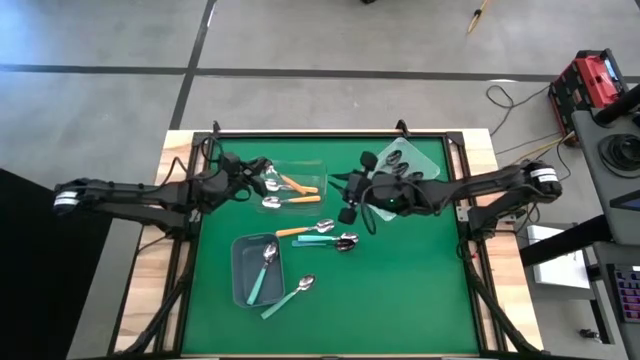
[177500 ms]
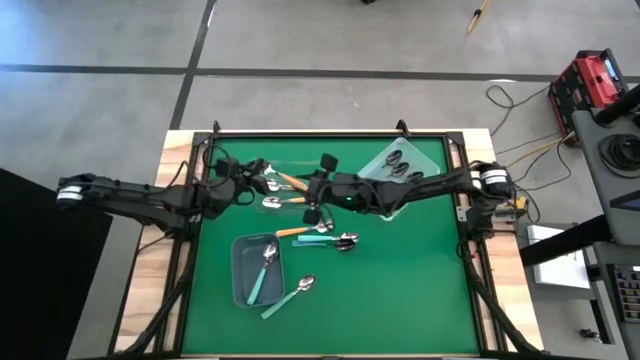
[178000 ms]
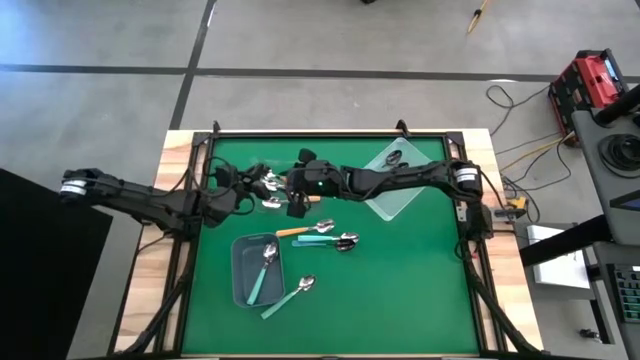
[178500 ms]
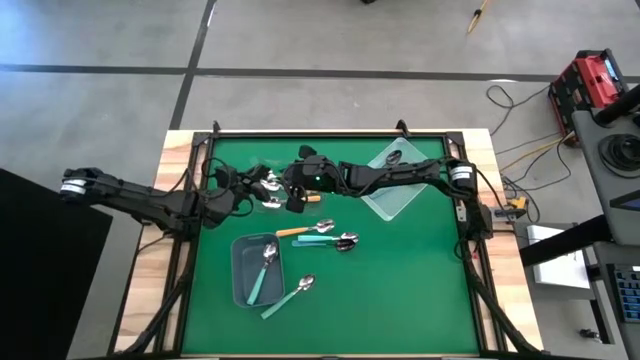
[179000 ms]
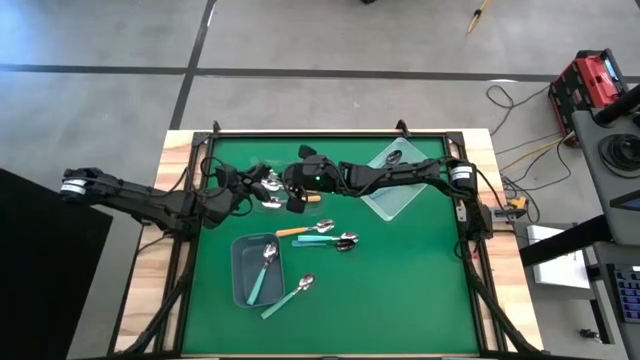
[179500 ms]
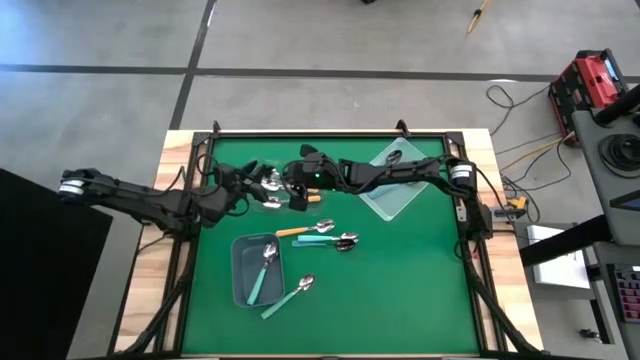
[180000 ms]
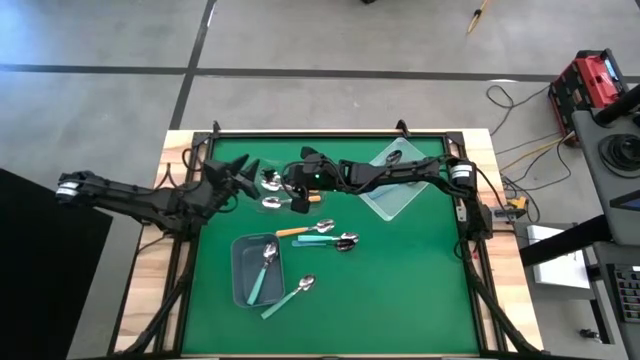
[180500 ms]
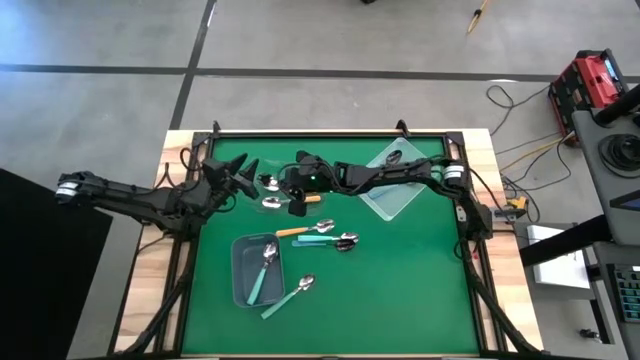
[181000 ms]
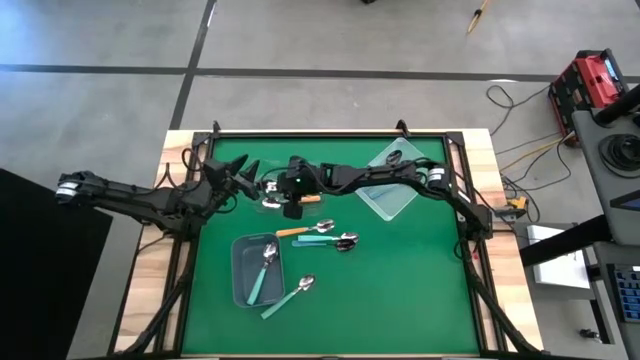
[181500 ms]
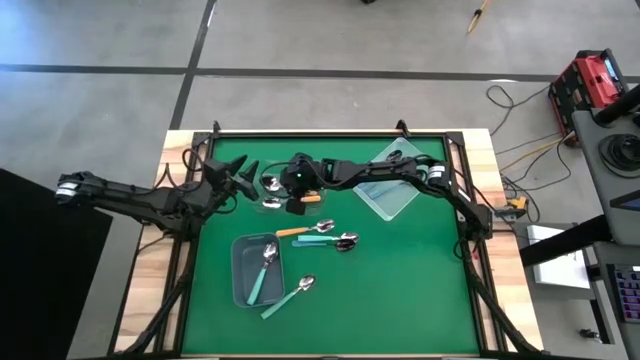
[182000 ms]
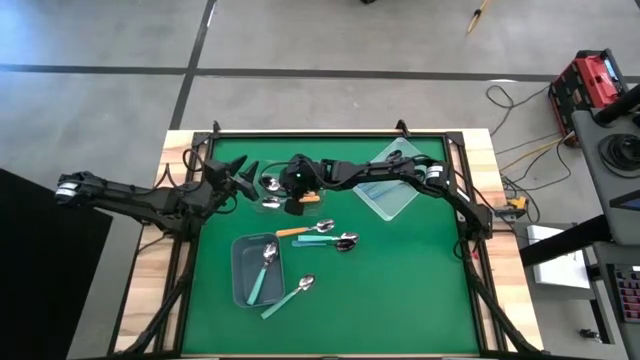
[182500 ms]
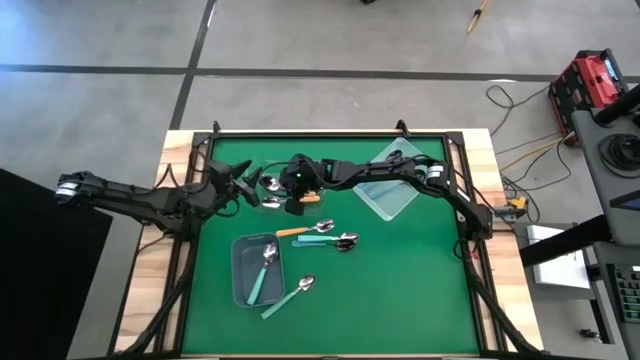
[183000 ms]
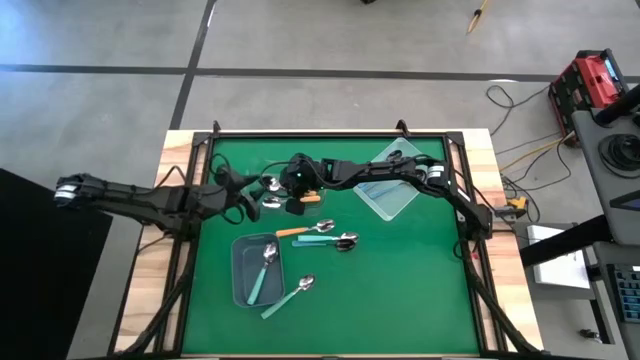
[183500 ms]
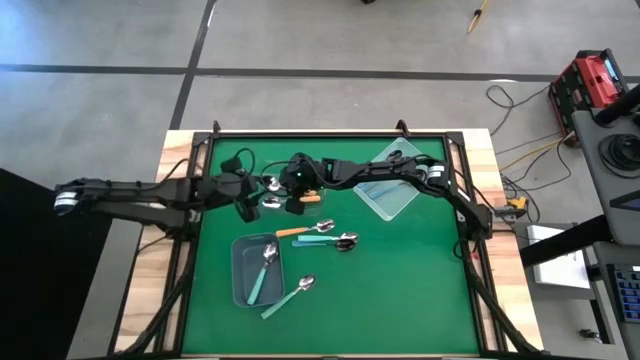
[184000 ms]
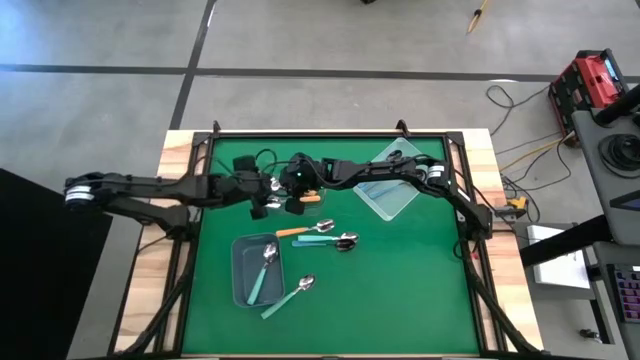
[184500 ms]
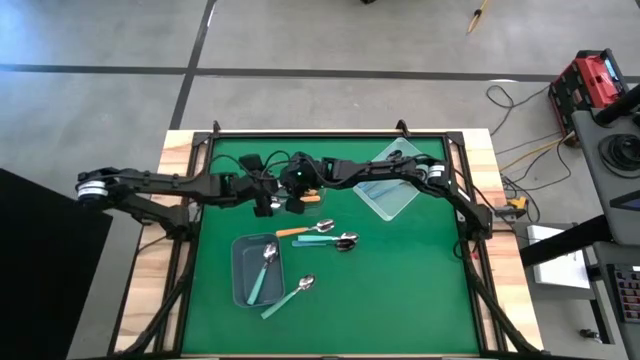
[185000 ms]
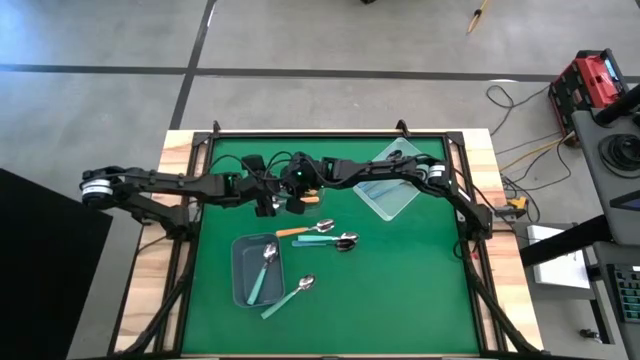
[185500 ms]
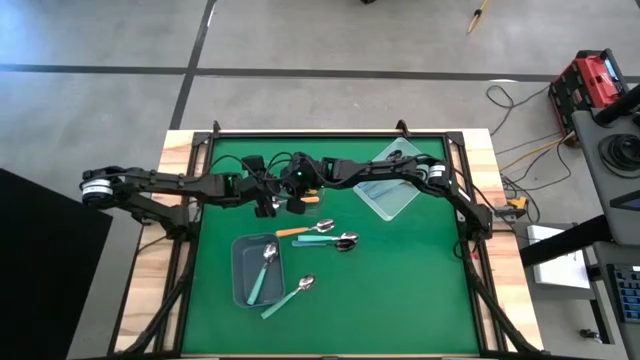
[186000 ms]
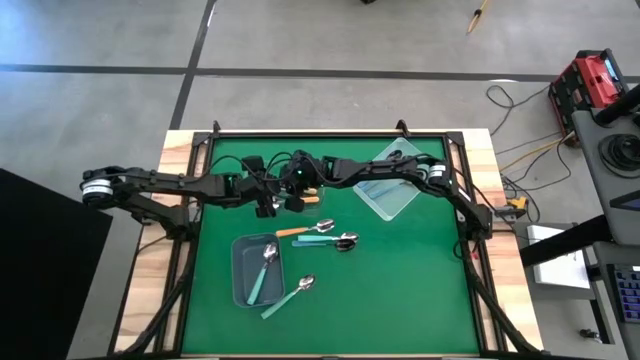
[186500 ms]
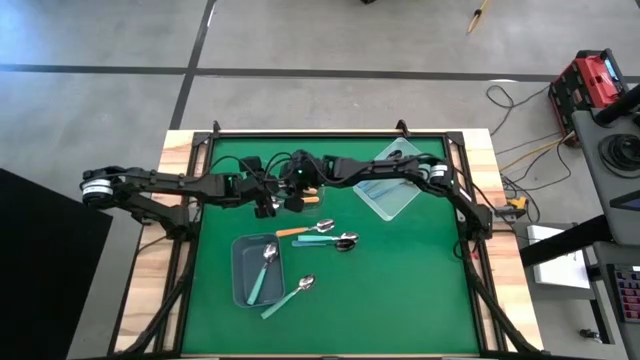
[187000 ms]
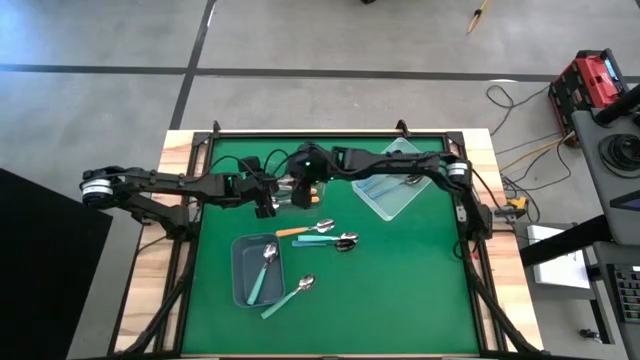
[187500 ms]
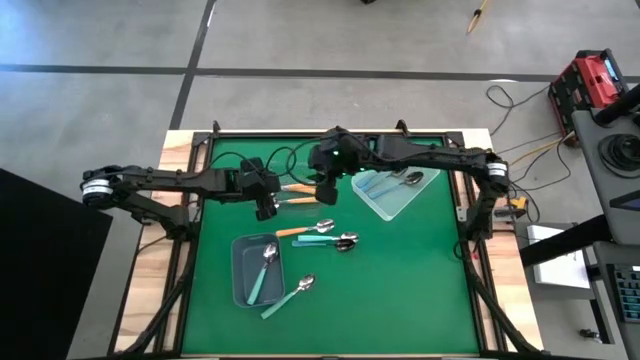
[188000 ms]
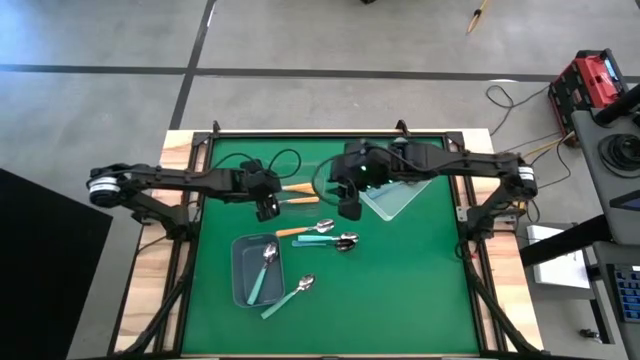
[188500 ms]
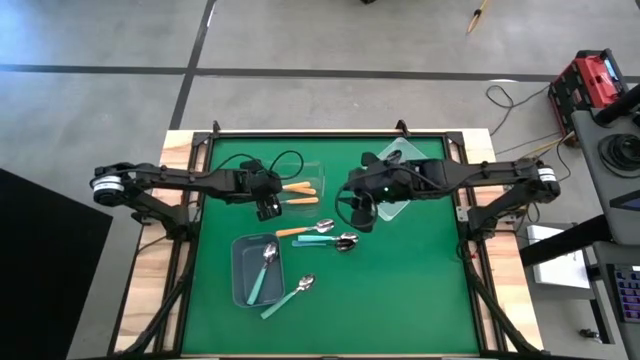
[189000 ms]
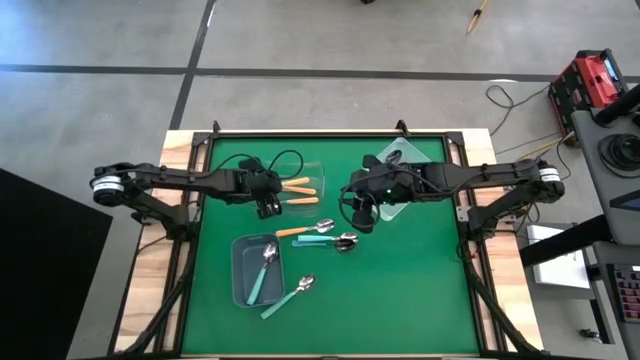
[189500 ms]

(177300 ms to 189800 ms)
Task: Sort silverware by color (type)
Put the orange spoon into the transparent bin

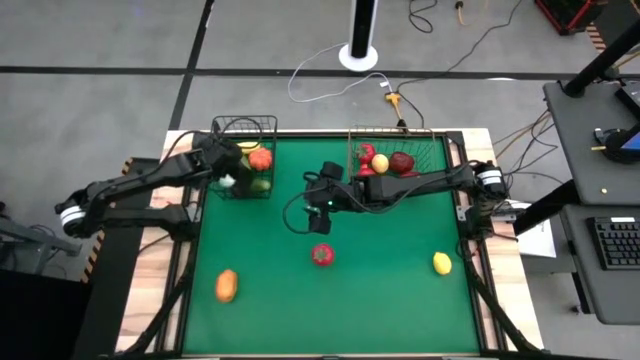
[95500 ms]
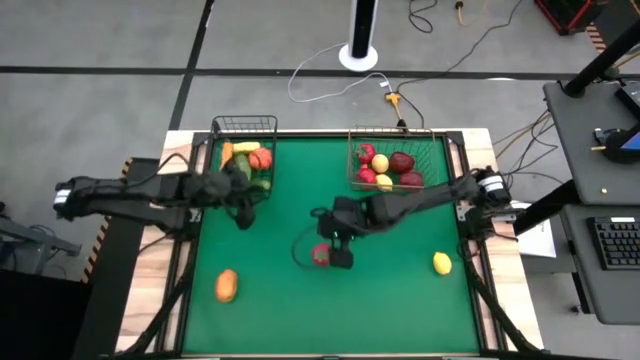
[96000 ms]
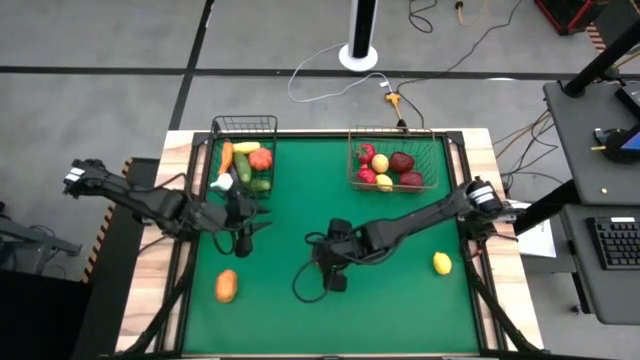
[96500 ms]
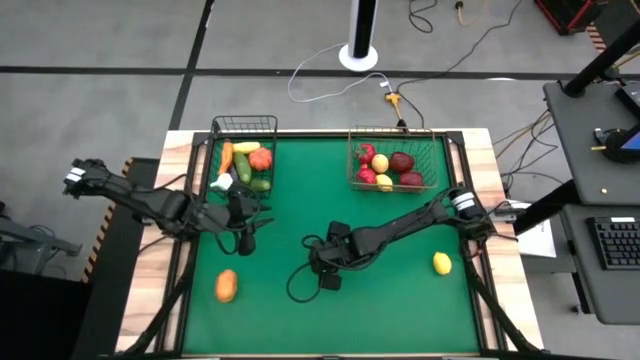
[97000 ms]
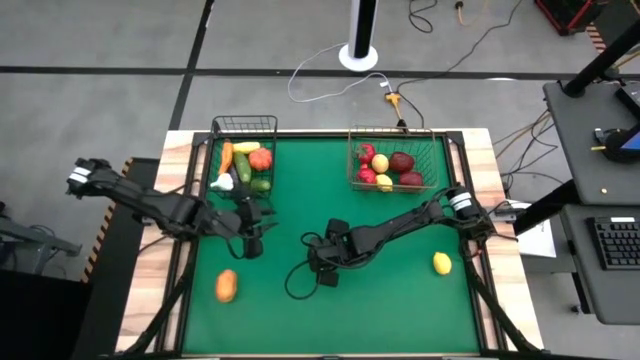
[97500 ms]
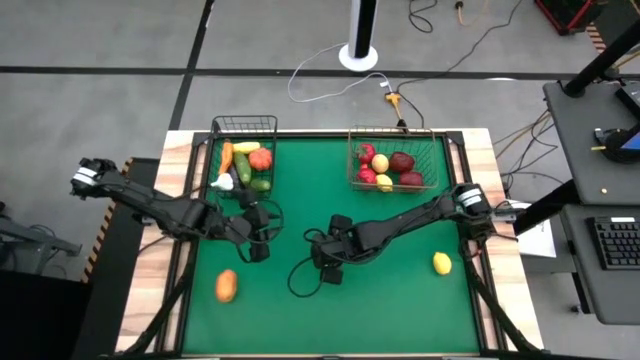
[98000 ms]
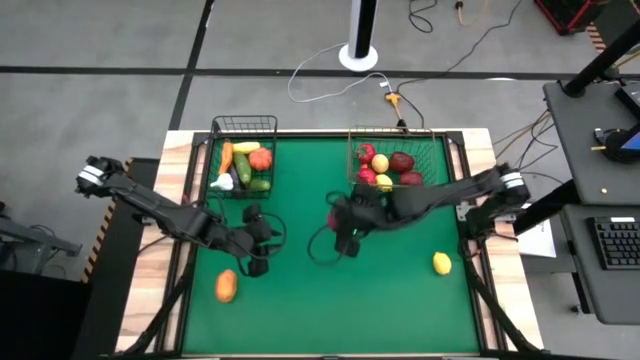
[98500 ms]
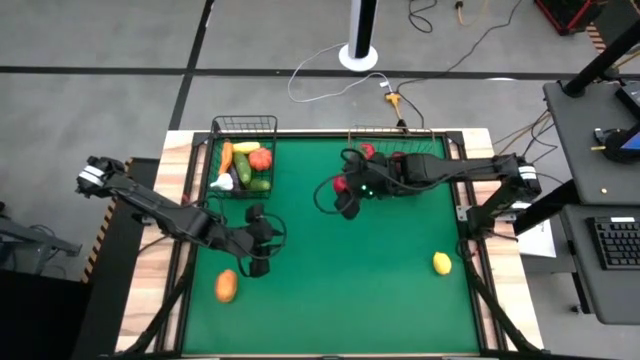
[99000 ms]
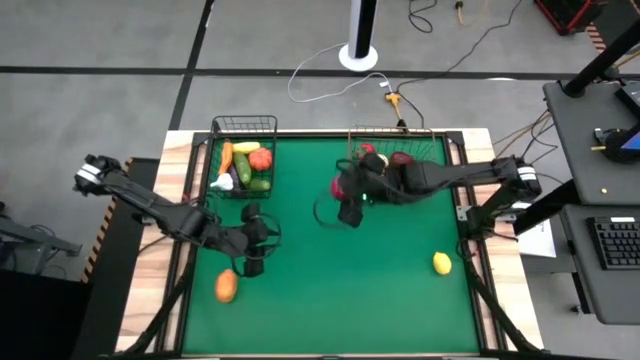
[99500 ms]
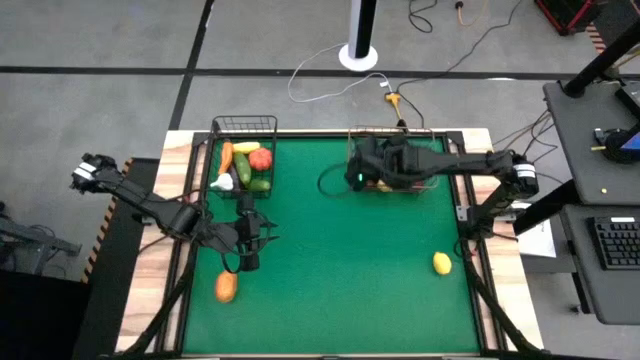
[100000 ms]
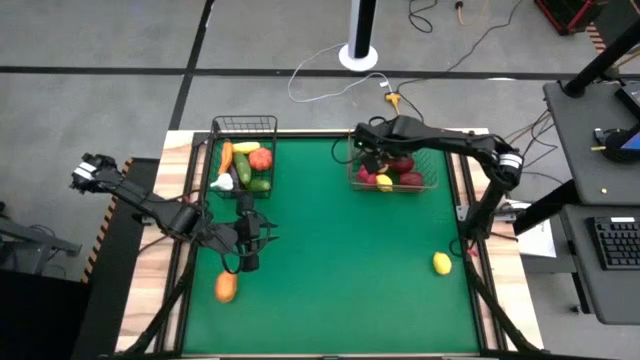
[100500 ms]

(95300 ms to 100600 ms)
Task: Sort produce into baskets
Put the red tomato into the right wire basket

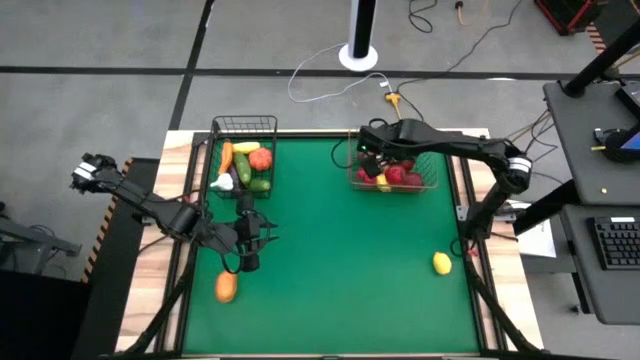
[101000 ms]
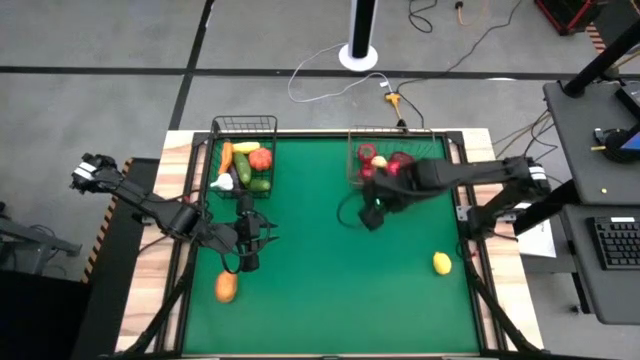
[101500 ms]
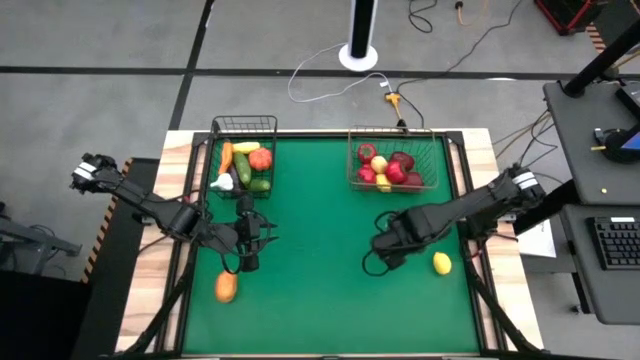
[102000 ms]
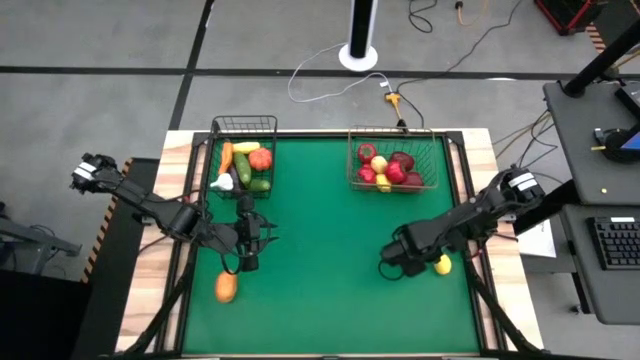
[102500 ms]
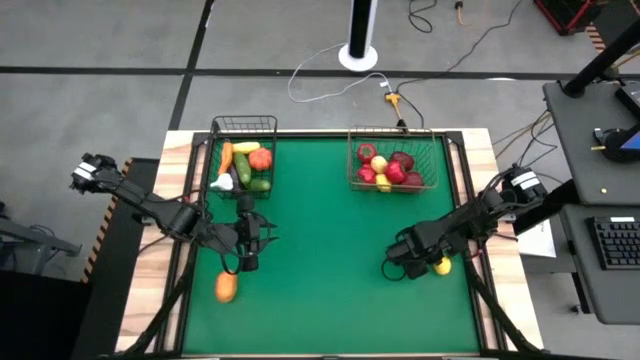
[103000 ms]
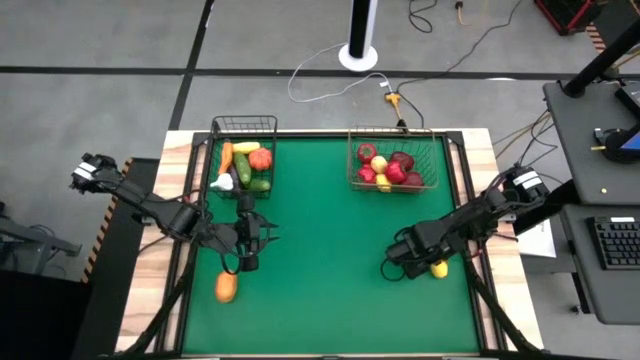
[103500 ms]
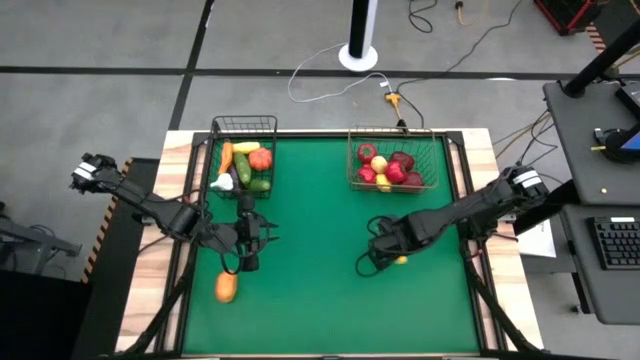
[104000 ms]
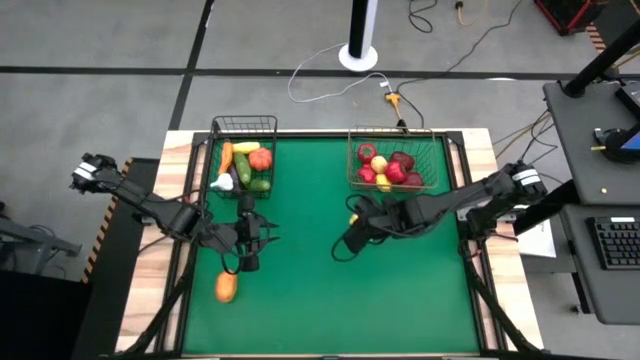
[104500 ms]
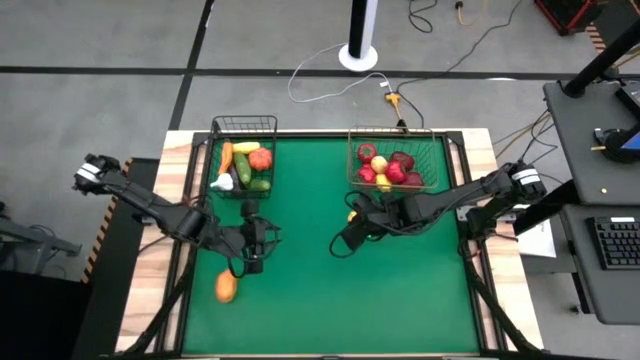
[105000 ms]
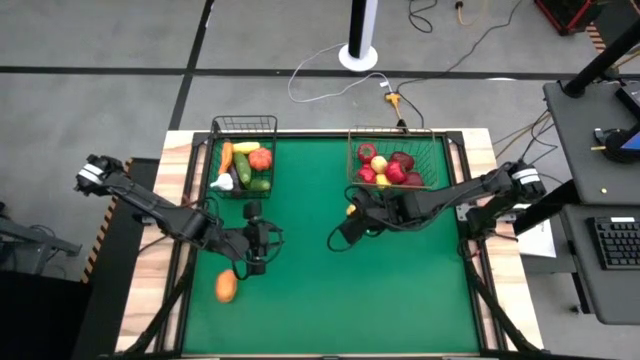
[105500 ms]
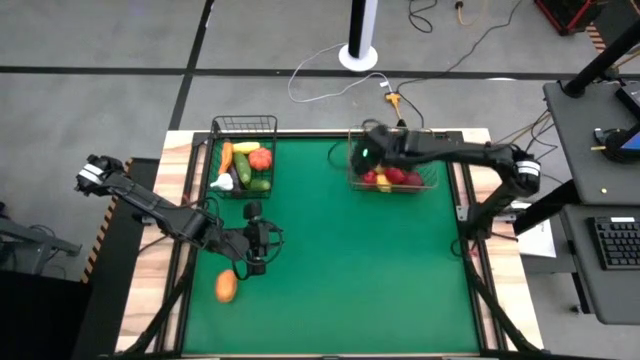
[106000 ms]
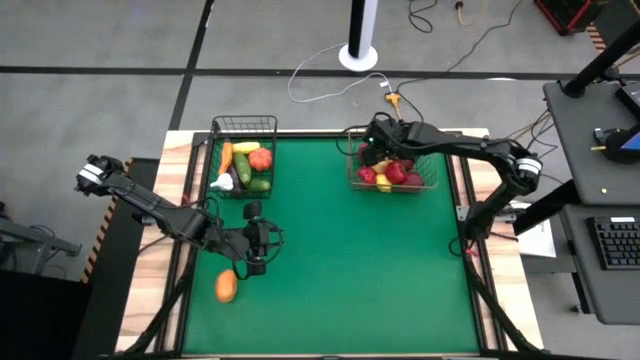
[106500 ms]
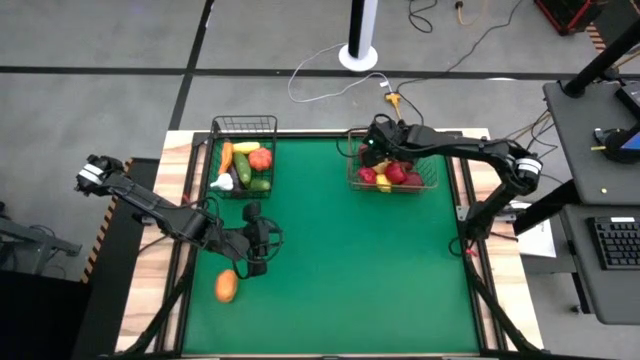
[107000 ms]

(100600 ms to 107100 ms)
Put the yellow lemon into the right wire basket
